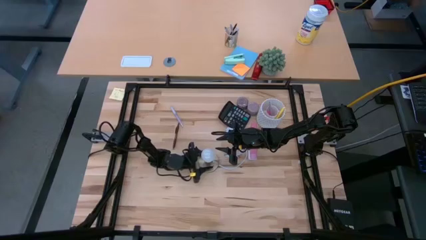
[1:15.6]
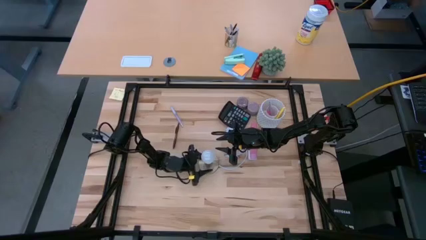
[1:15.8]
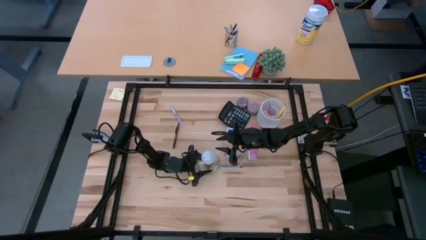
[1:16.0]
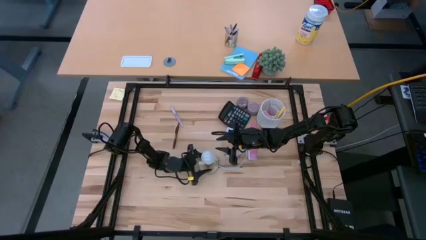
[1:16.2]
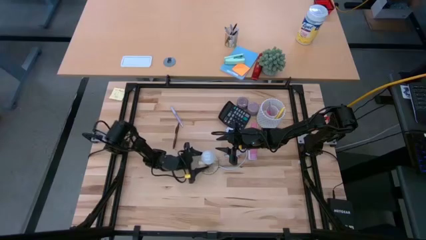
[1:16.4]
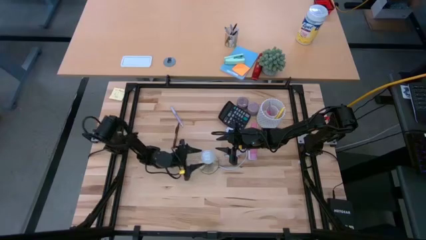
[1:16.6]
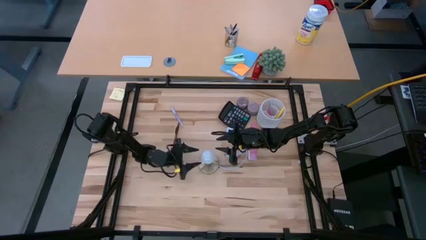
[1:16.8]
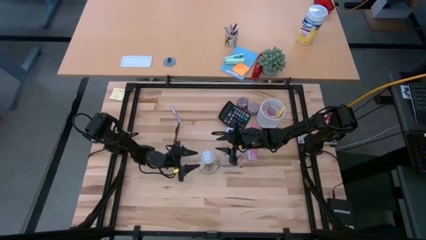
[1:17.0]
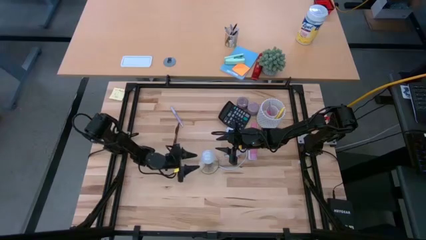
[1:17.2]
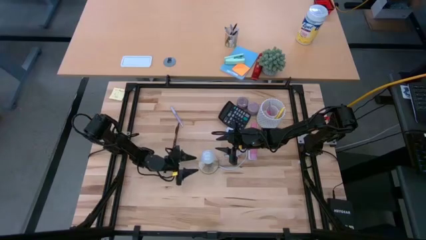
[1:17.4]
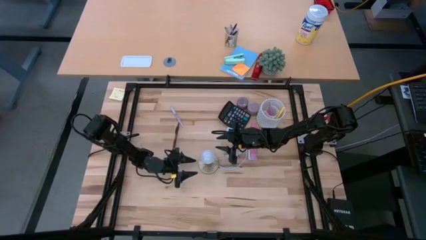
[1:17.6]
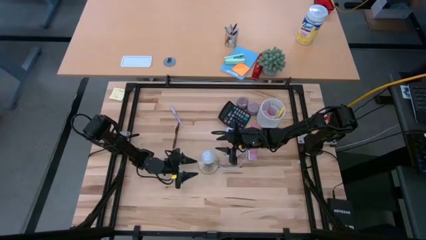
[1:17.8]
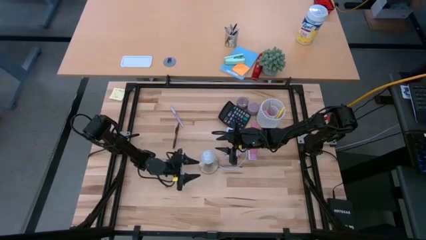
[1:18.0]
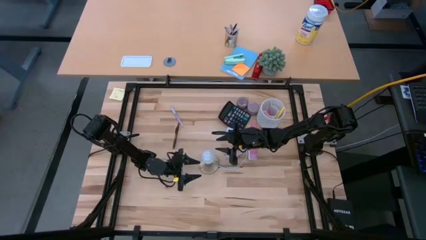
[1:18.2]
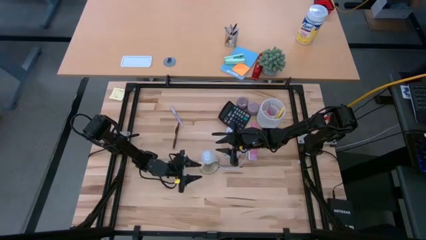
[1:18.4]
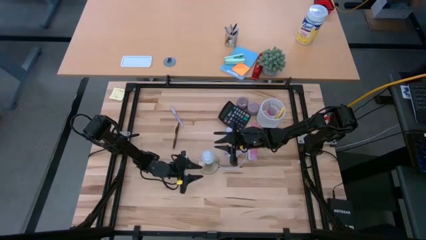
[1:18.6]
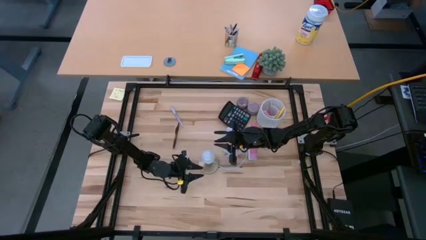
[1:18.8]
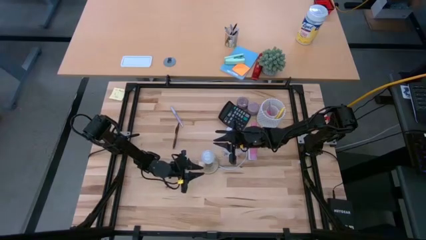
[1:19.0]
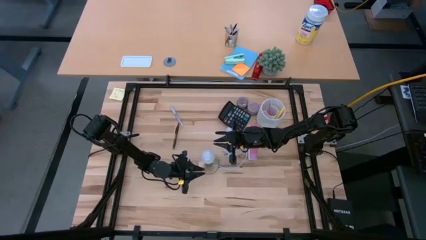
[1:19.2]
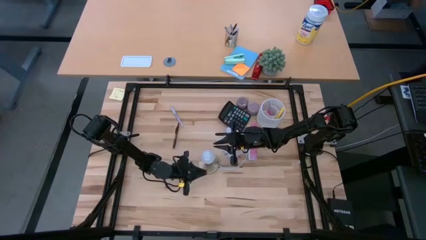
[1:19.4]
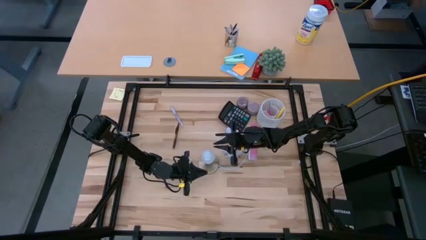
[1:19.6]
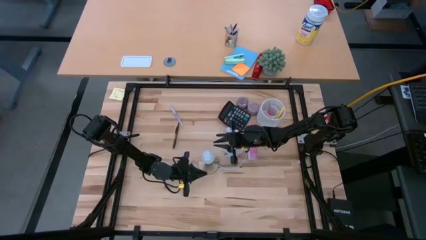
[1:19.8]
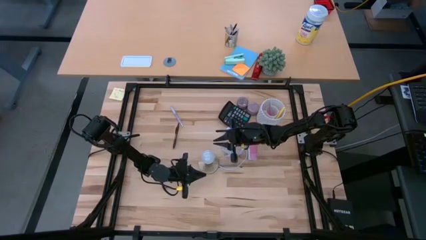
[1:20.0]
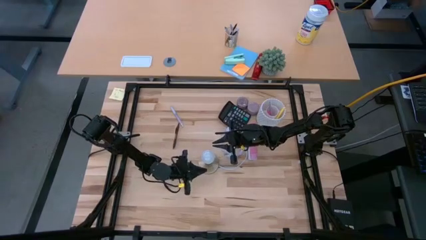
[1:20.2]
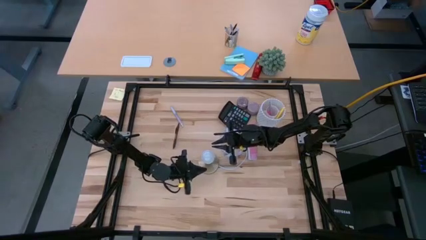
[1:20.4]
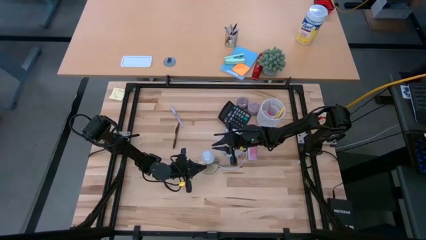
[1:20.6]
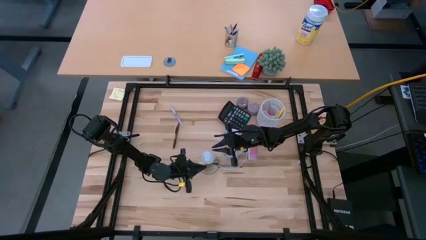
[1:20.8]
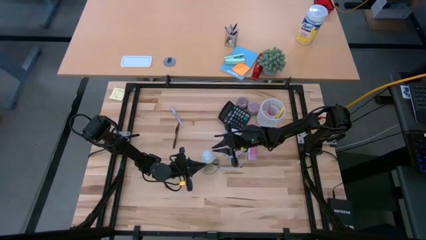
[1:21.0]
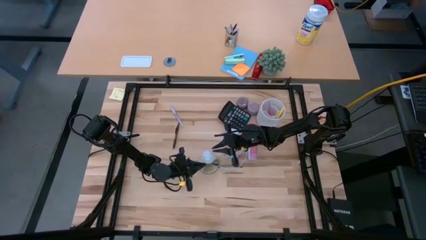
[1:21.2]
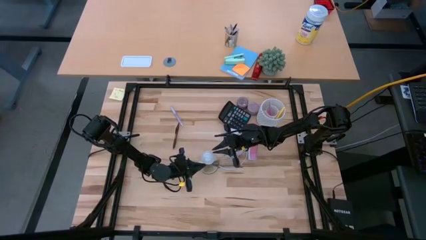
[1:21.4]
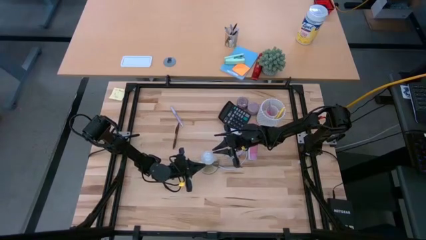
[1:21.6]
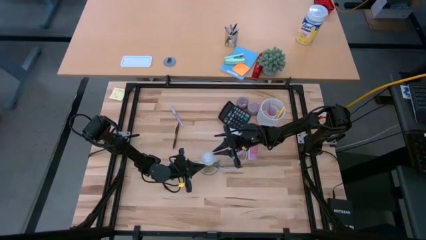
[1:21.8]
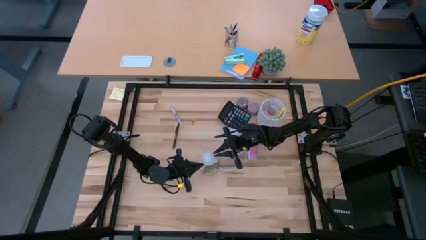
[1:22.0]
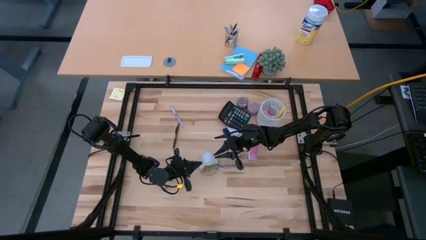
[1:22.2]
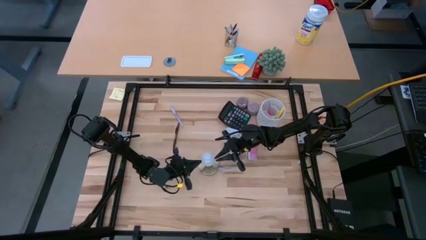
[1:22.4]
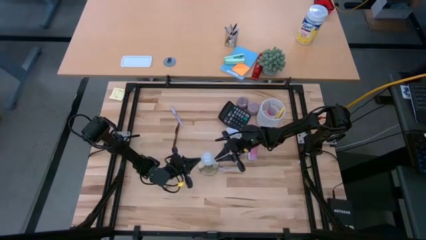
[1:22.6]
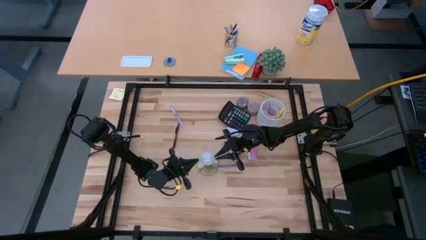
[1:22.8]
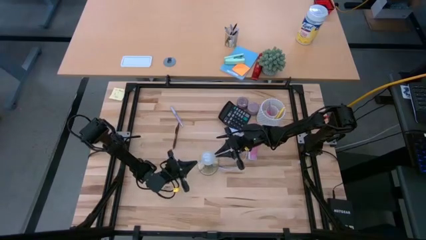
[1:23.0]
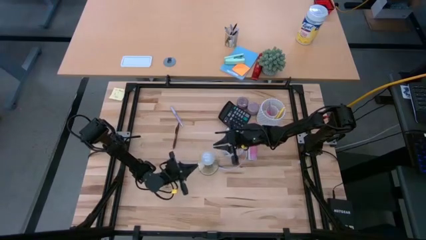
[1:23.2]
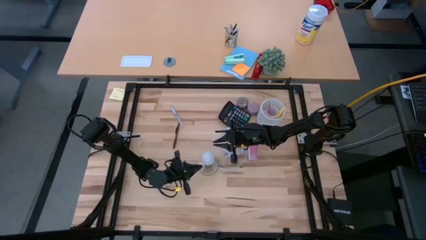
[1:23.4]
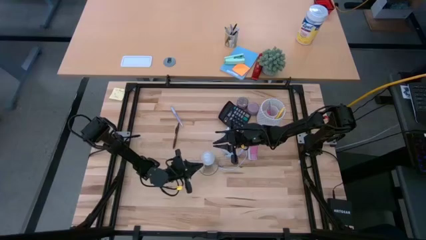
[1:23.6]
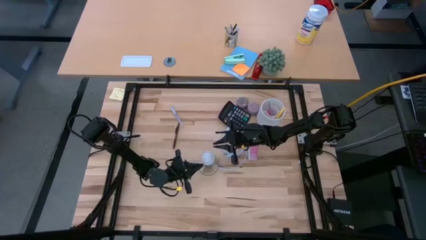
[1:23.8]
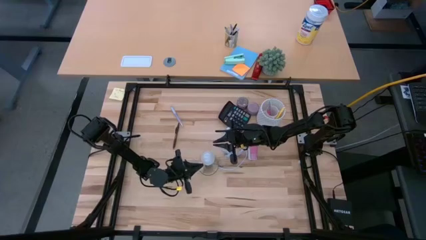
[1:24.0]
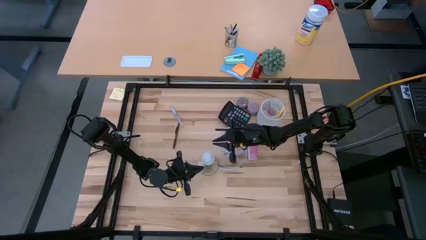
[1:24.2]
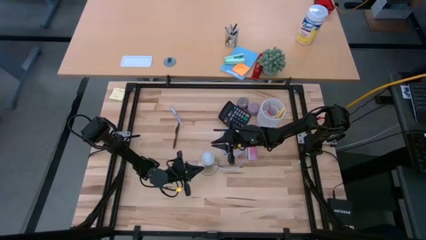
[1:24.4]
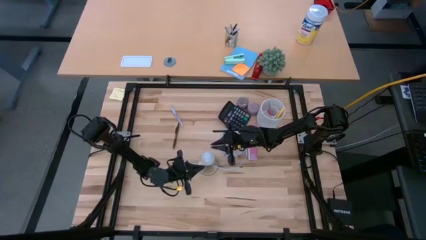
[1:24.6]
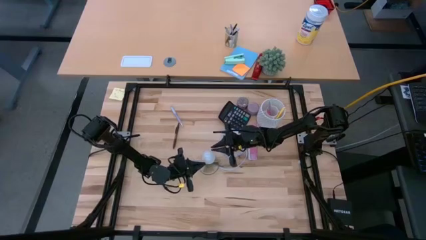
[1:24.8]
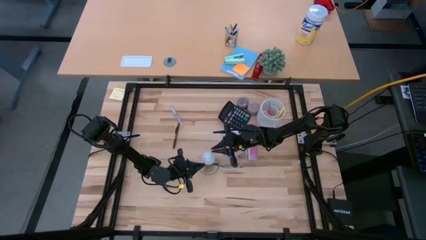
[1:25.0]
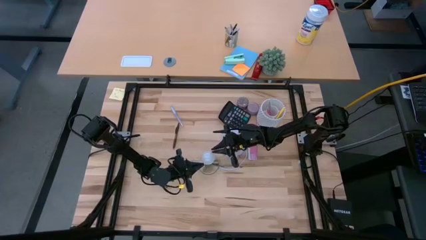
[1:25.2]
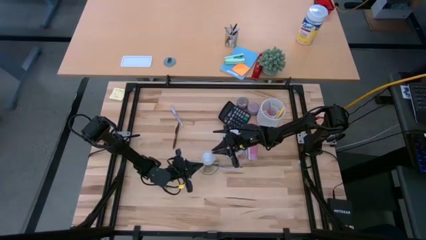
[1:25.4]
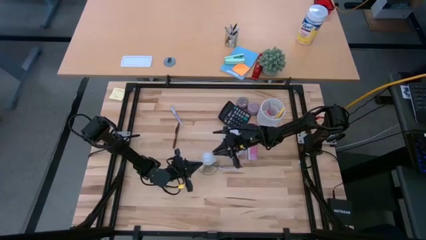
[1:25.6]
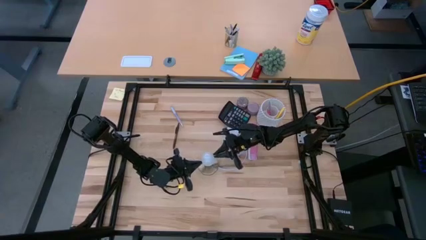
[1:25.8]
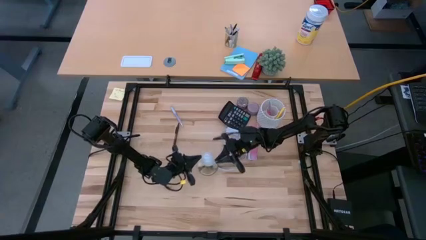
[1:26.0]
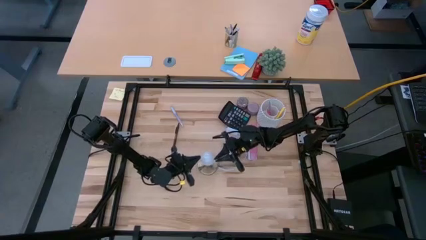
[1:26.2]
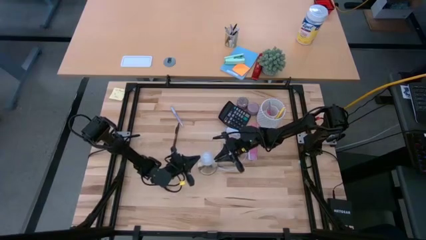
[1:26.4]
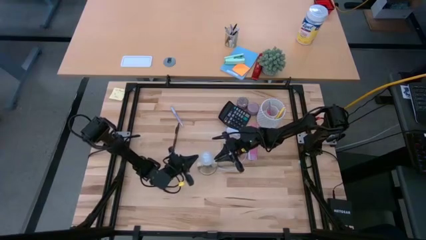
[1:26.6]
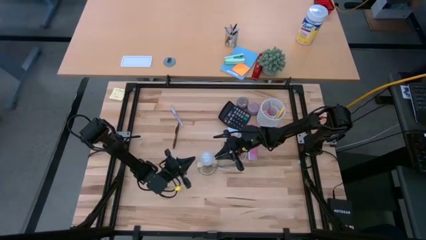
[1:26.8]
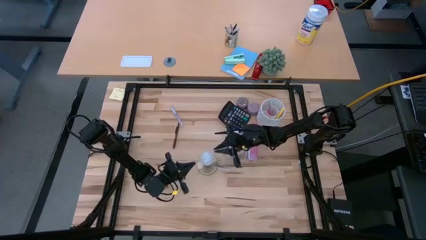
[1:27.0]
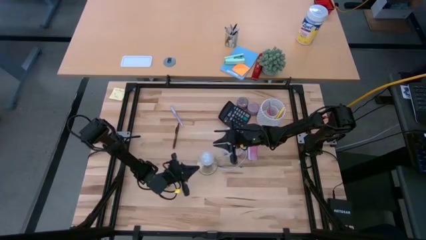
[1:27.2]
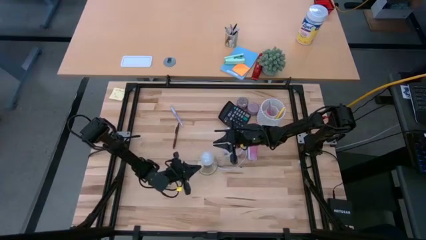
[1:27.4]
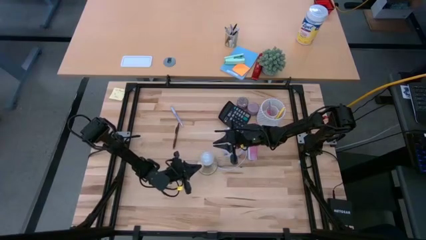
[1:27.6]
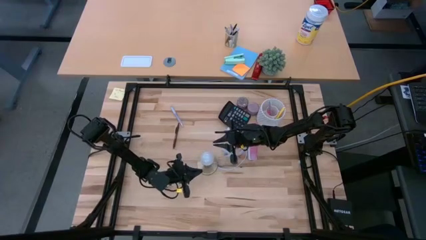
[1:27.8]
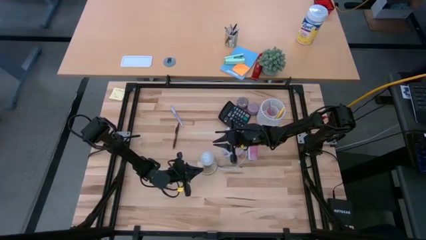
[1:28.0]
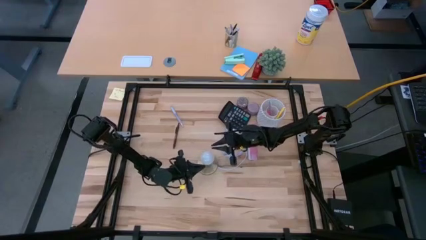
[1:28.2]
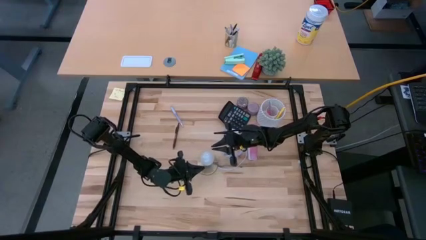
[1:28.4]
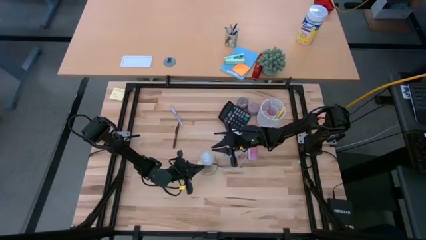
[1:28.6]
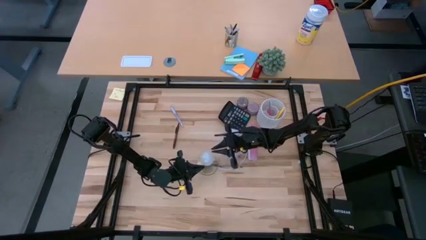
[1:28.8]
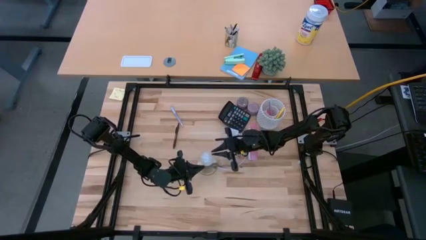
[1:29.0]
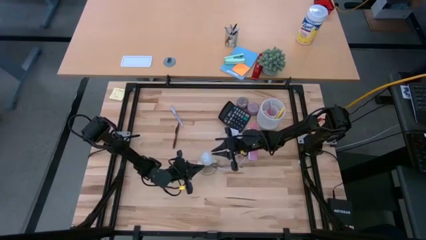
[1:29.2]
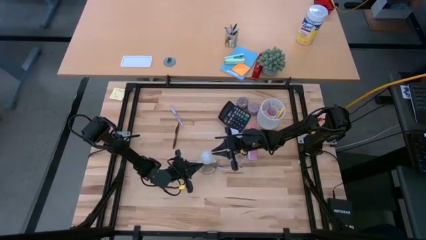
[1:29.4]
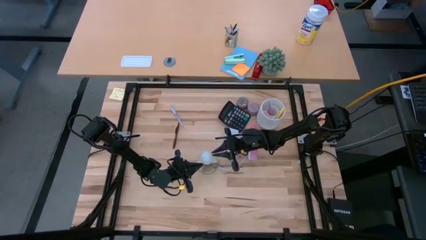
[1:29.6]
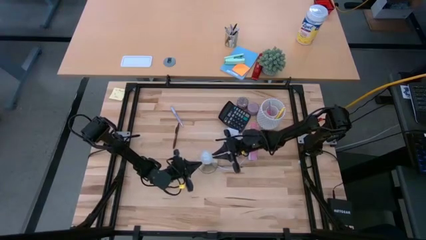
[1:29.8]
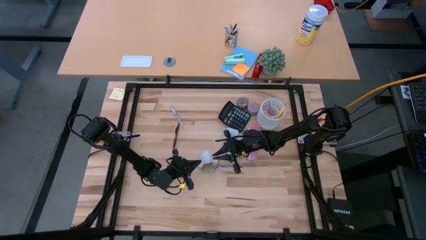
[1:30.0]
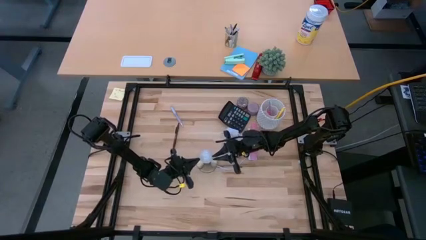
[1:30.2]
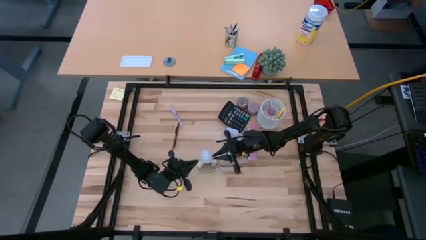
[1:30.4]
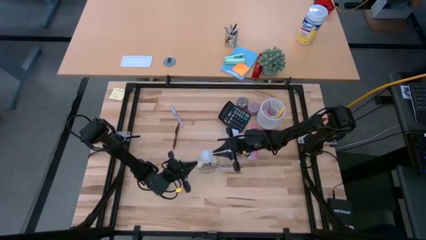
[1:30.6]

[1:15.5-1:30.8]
Task: Screw lightbulb
Insert the lightbulb into the gold lamp
